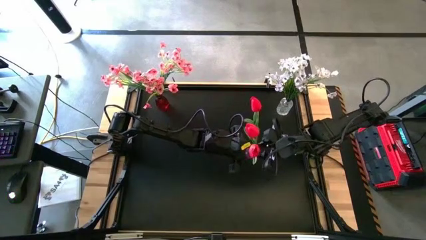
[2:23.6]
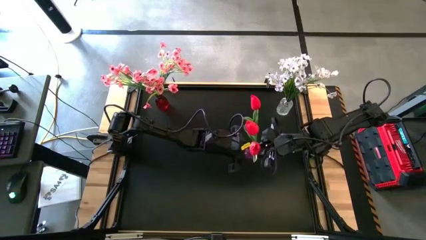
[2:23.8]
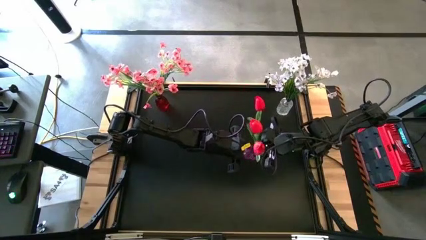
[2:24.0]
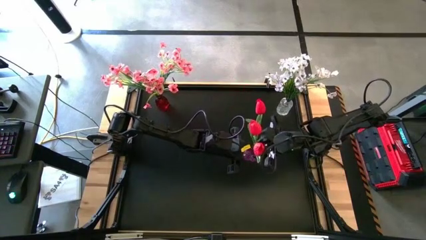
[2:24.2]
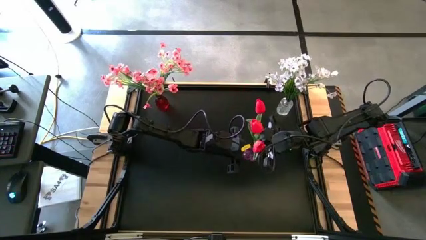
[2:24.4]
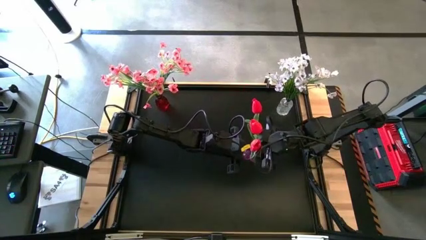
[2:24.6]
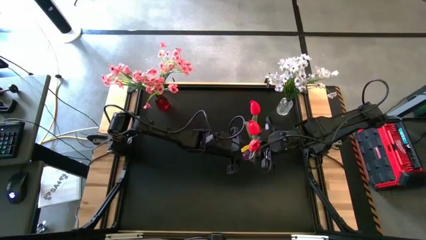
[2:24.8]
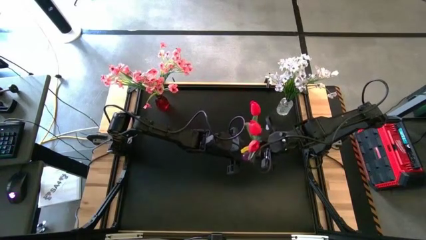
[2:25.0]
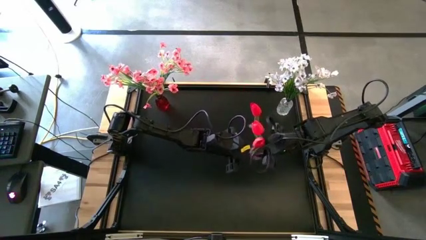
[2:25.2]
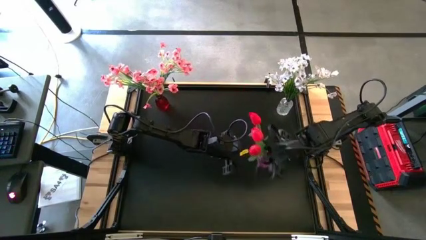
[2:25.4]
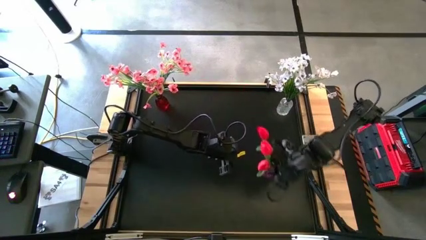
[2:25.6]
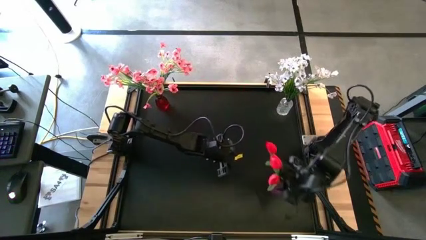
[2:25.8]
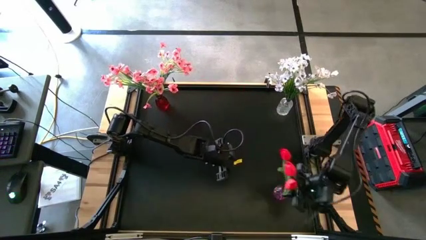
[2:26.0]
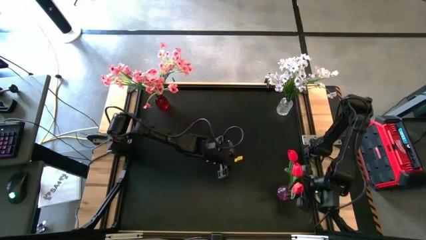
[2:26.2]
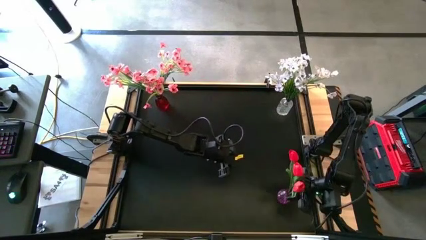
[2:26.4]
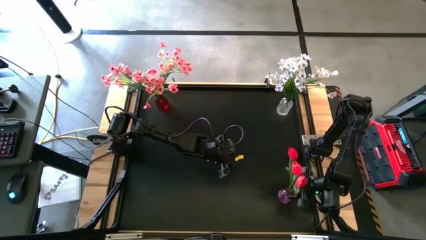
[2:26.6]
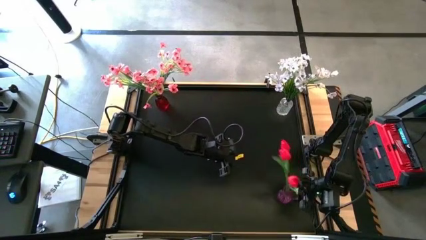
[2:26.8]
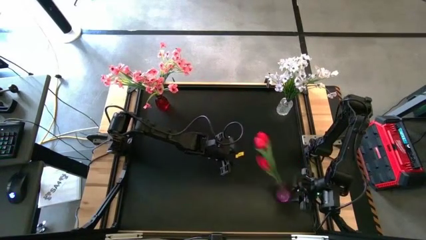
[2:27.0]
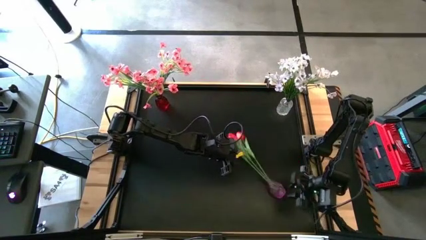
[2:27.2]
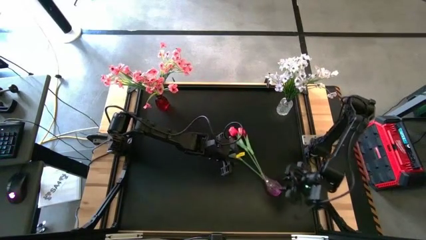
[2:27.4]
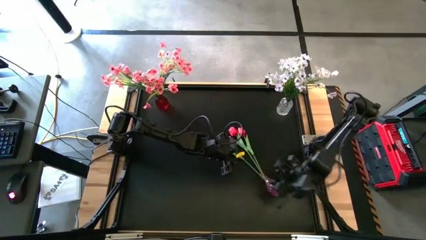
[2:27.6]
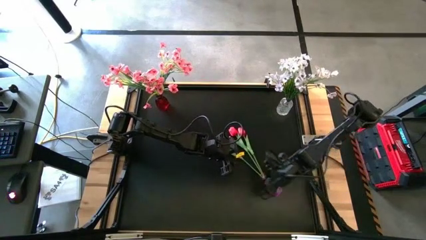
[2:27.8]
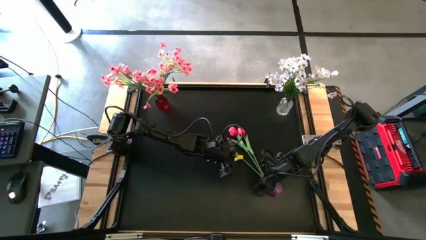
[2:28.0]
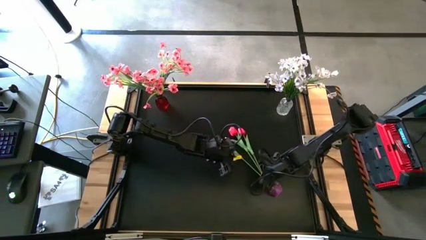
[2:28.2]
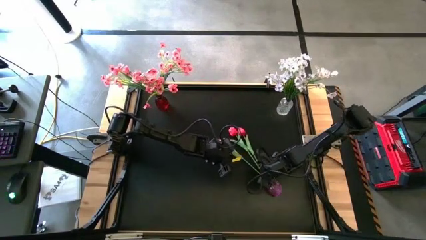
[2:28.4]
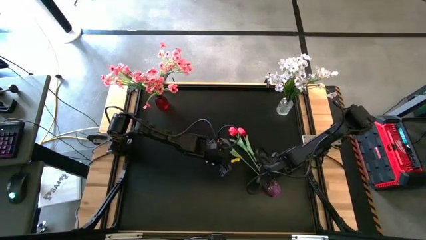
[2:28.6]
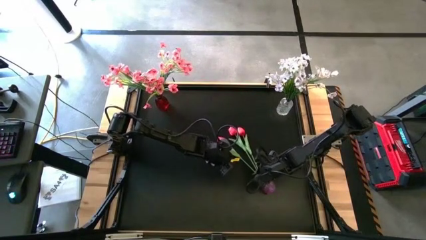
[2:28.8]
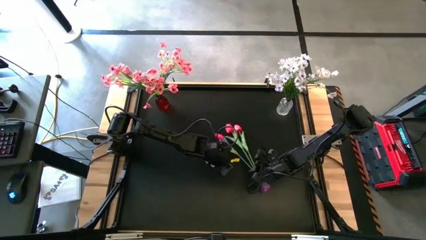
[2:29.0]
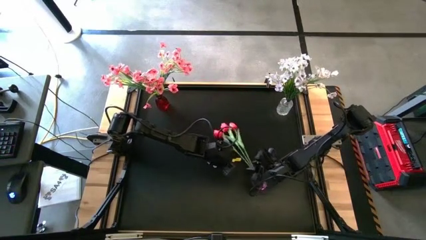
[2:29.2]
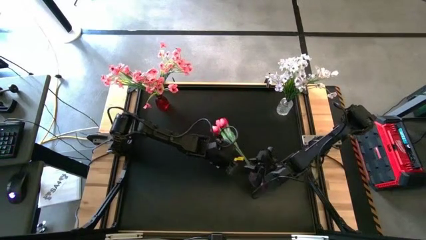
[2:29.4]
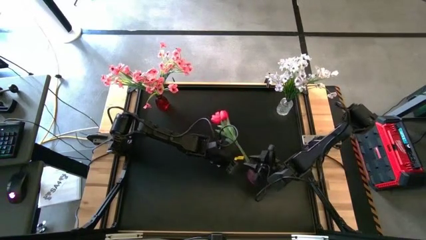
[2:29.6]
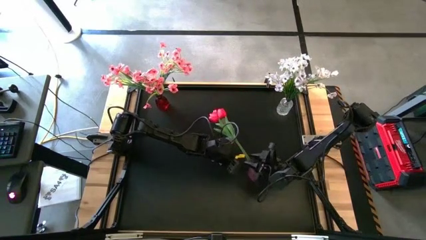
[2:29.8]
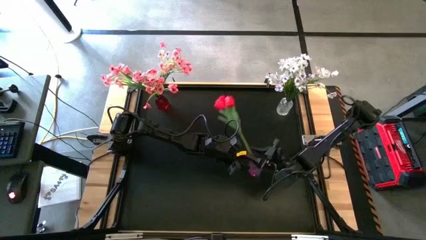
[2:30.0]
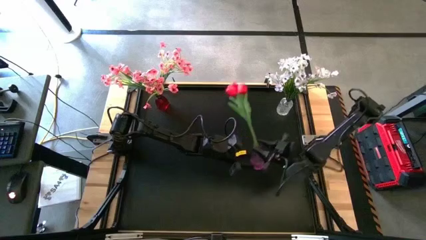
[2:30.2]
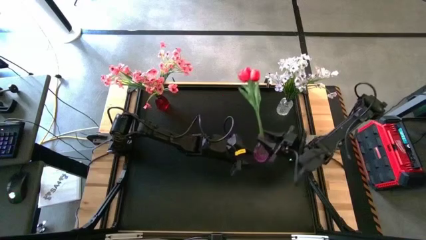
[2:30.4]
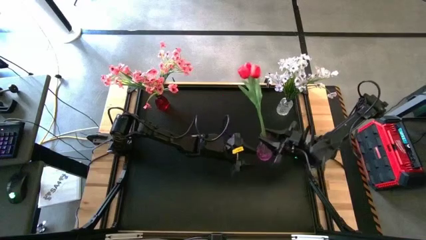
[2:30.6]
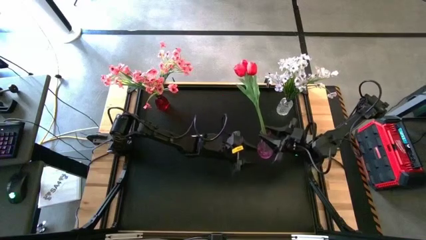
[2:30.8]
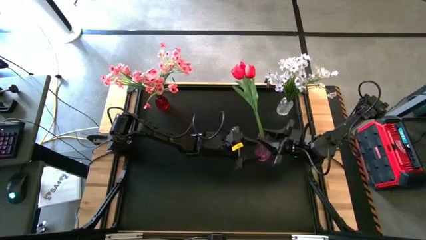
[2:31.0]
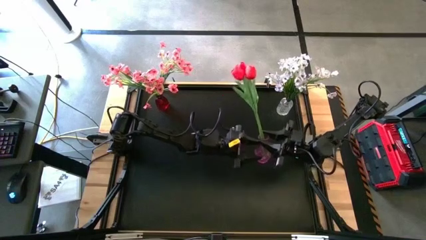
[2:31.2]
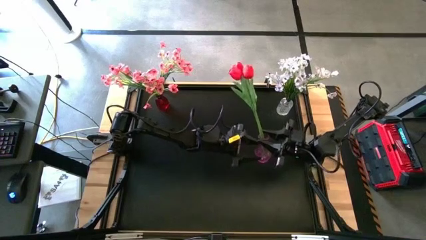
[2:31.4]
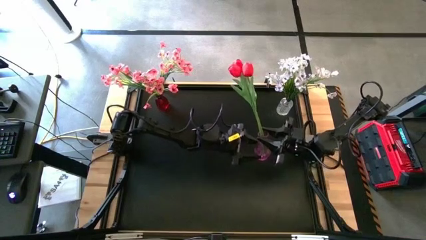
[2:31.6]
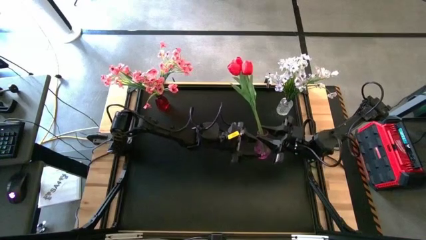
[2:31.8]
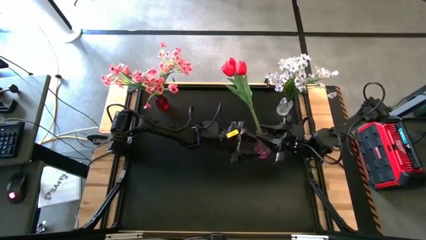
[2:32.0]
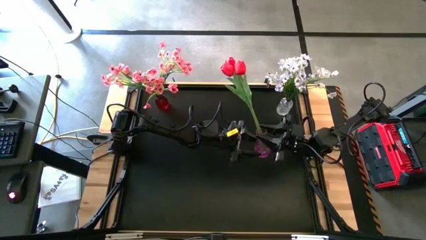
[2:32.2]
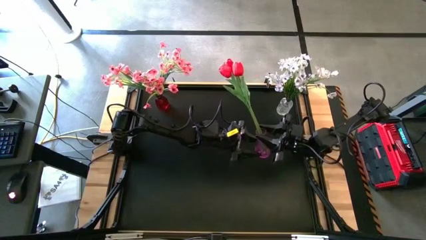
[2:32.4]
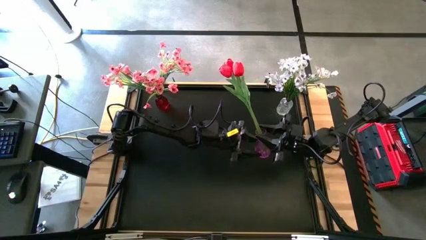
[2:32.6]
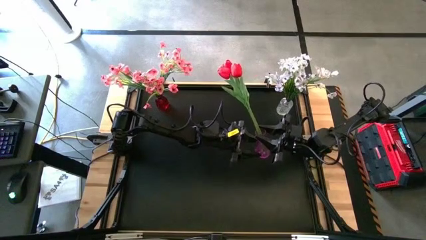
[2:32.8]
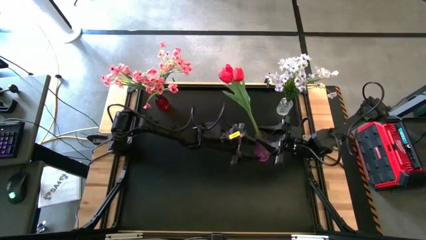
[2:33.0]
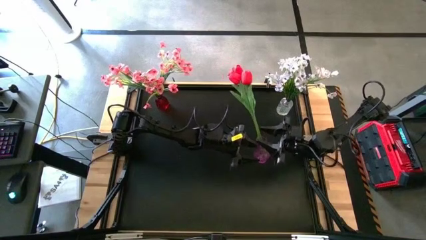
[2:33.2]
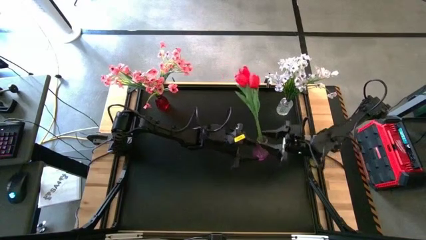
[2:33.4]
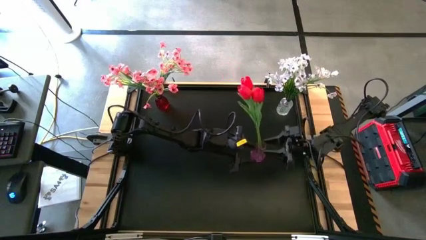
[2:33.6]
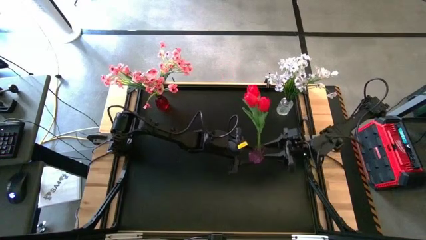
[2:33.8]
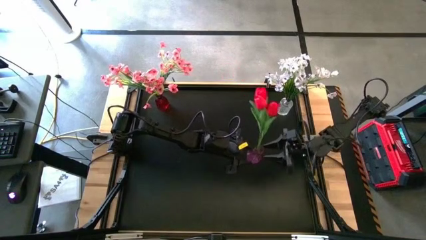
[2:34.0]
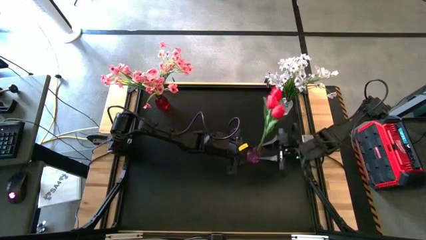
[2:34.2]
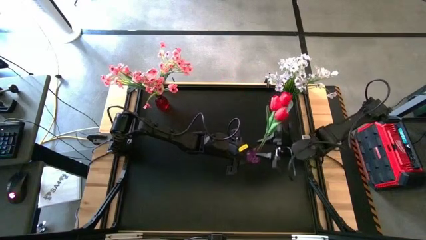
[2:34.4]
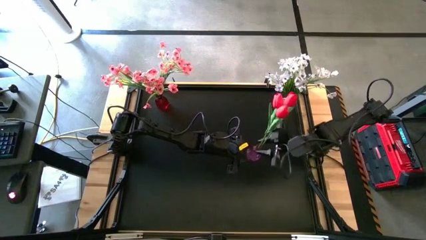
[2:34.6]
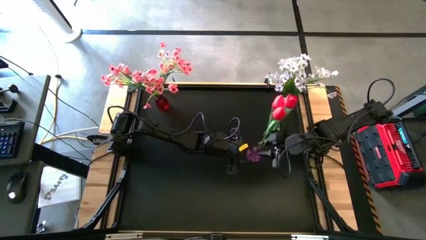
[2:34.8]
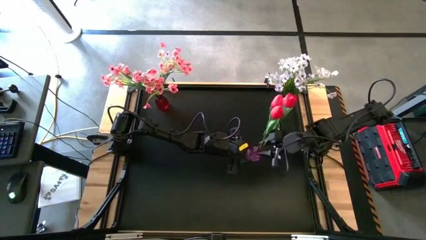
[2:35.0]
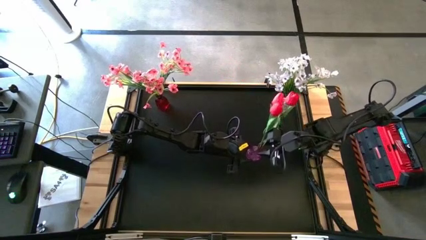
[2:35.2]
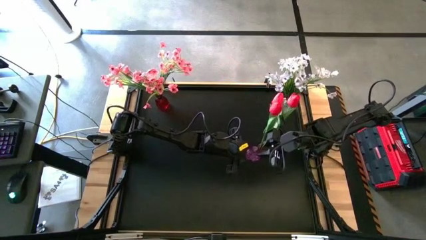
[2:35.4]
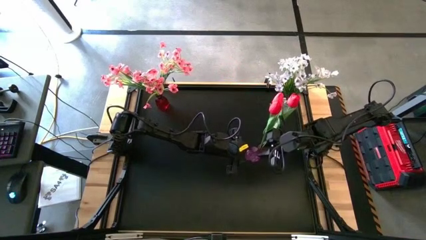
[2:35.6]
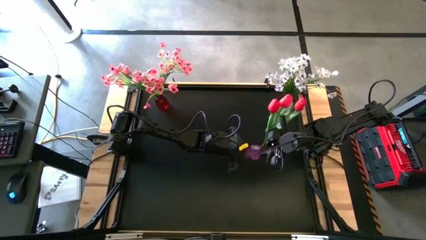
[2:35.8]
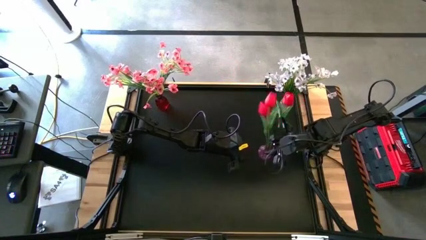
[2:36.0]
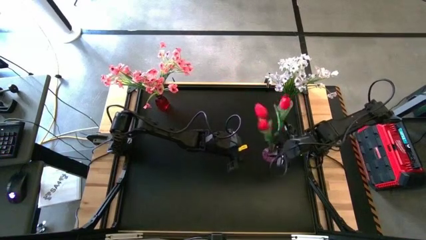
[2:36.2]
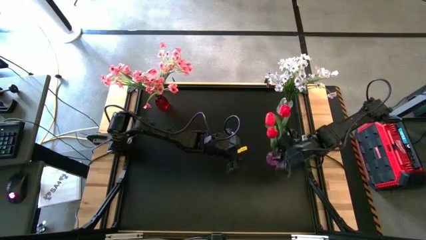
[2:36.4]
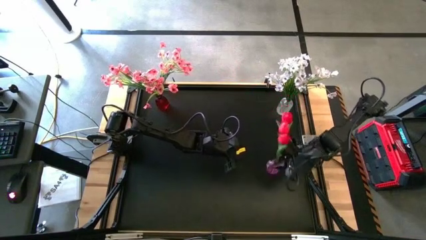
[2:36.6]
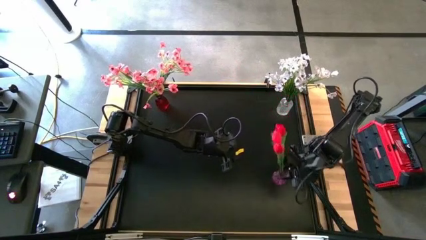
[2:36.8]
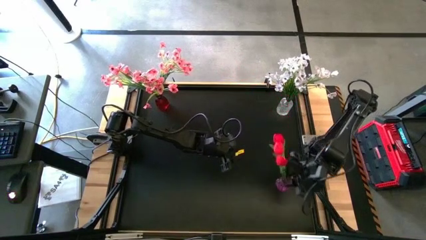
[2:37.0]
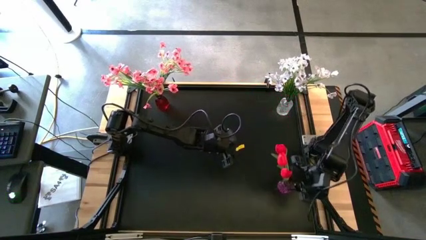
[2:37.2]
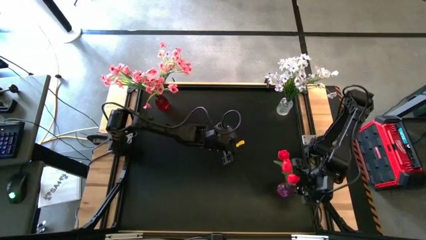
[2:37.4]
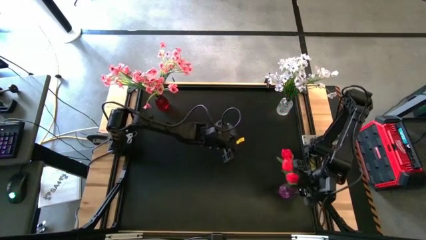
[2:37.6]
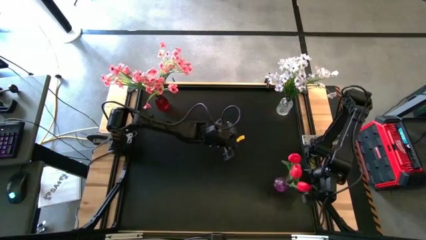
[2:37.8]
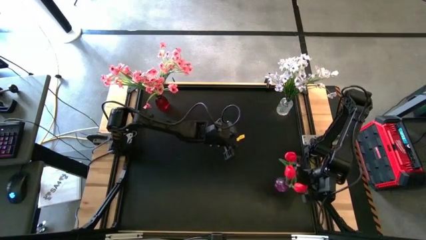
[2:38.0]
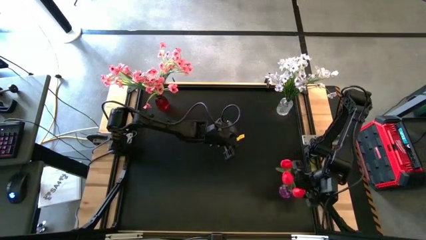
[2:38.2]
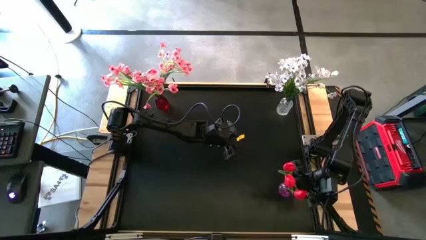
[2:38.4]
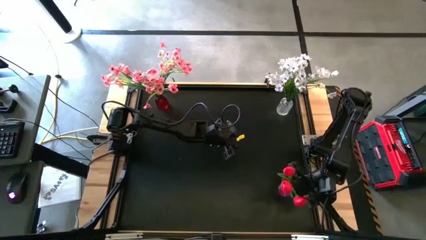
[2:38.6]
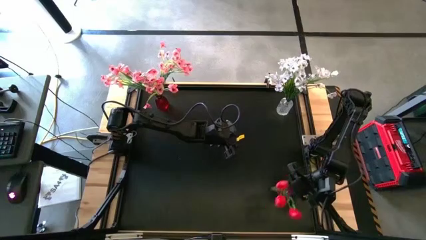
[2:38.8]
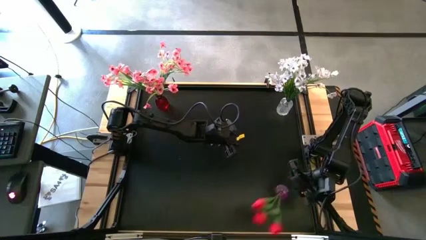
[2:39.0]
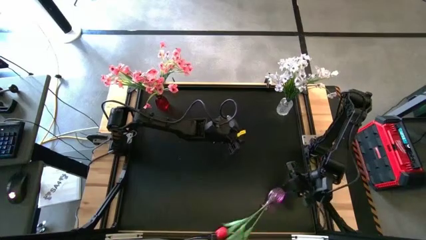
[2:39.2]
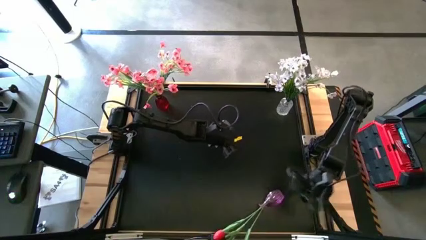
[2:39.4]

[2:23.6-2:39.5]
Task: Sort flowers into vase by color
Adjust the purple flower vase
